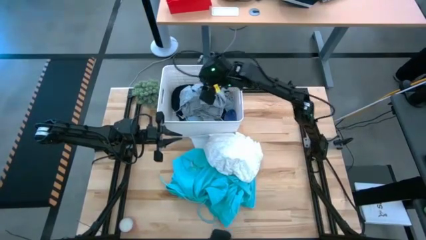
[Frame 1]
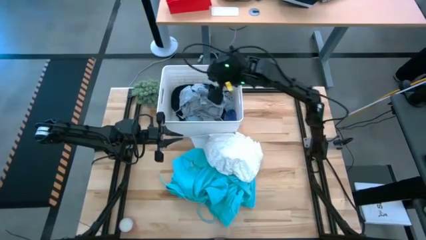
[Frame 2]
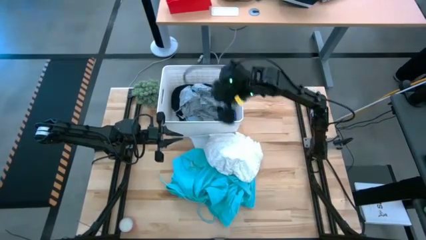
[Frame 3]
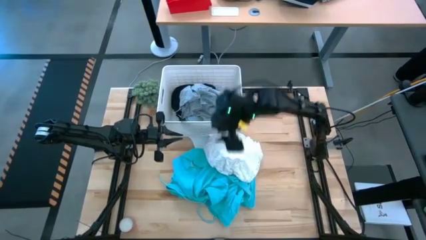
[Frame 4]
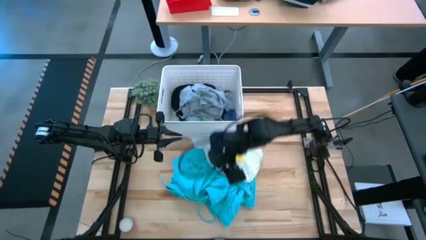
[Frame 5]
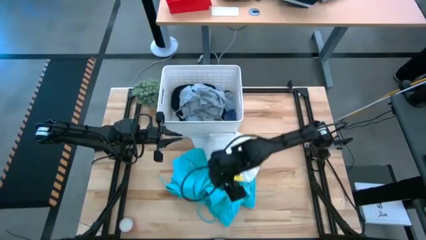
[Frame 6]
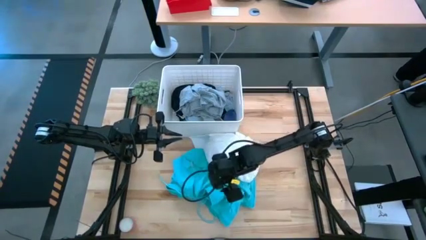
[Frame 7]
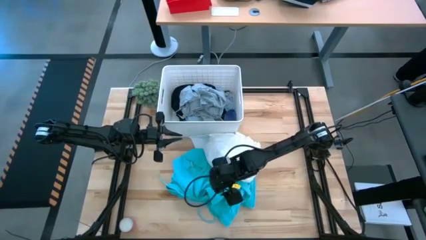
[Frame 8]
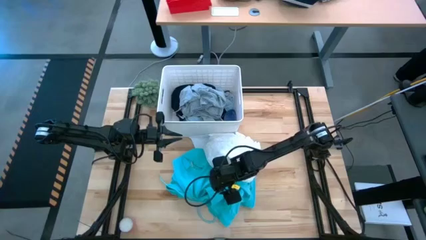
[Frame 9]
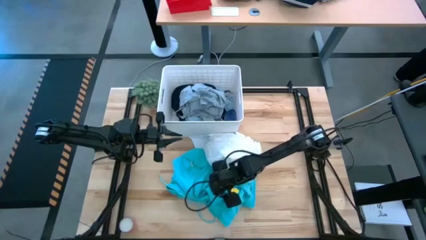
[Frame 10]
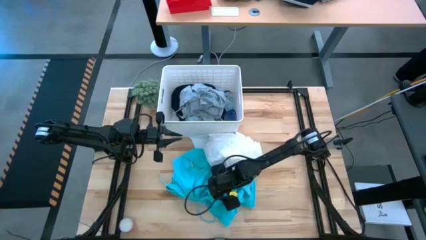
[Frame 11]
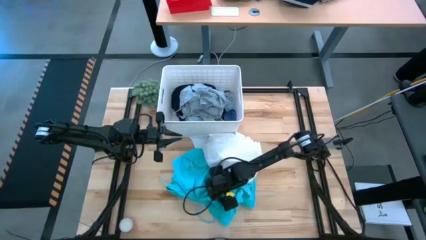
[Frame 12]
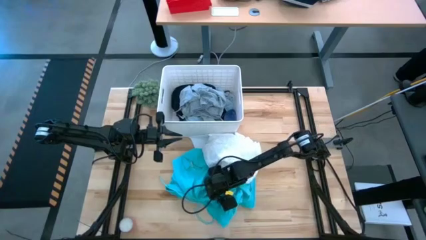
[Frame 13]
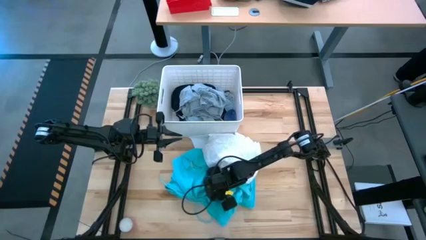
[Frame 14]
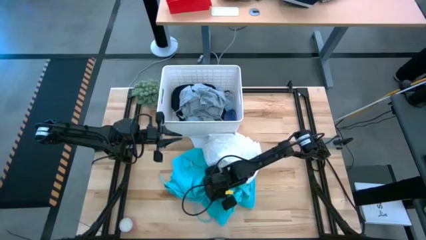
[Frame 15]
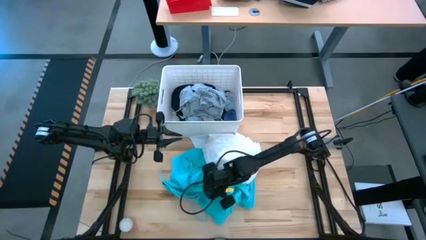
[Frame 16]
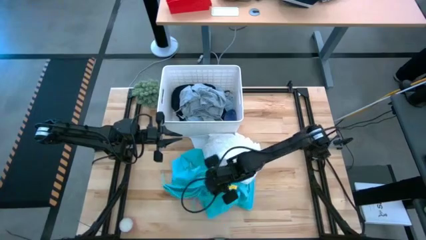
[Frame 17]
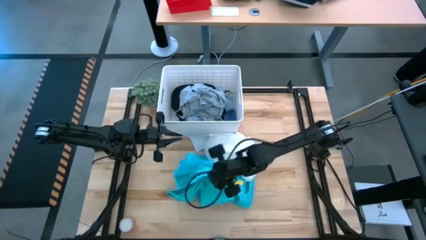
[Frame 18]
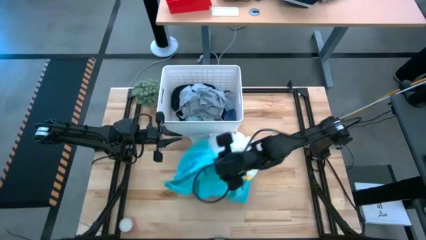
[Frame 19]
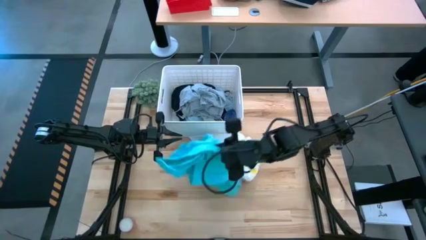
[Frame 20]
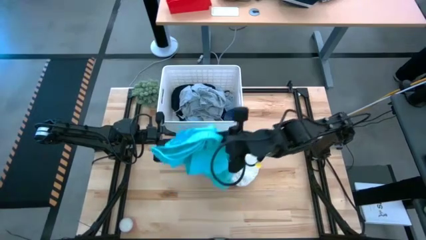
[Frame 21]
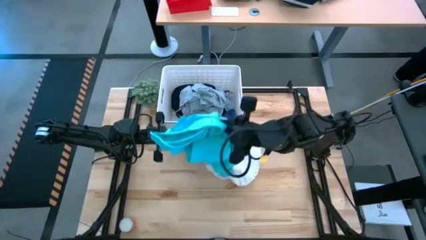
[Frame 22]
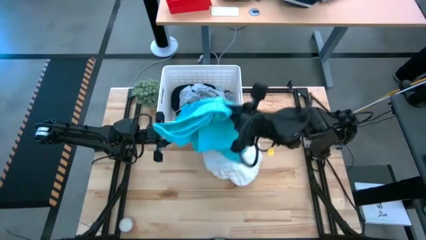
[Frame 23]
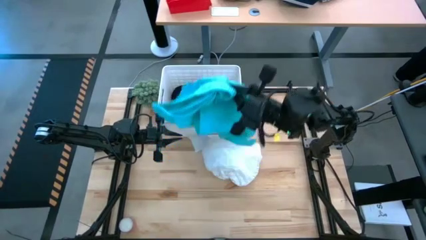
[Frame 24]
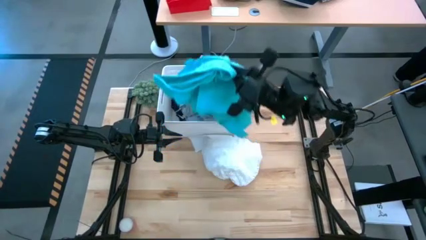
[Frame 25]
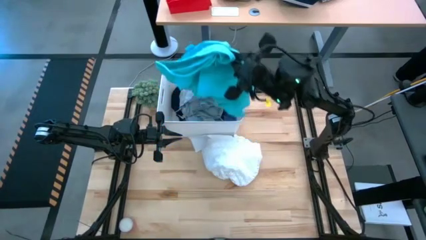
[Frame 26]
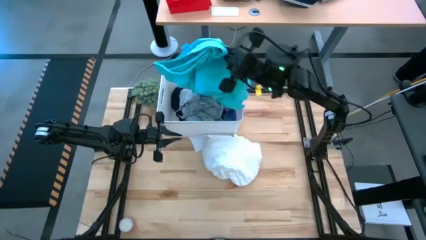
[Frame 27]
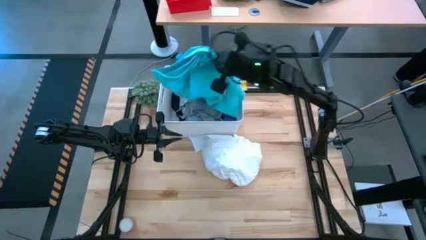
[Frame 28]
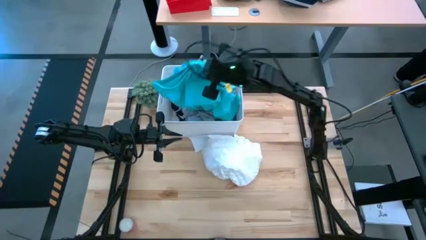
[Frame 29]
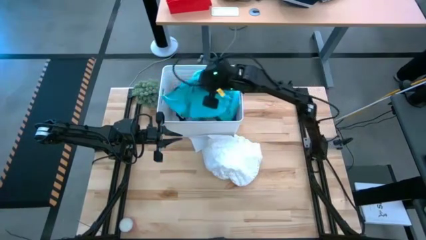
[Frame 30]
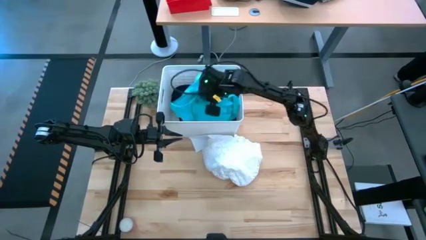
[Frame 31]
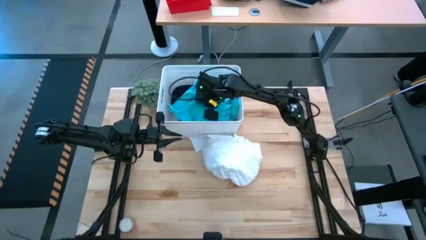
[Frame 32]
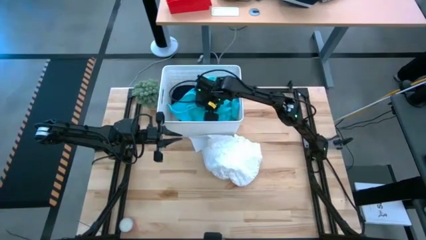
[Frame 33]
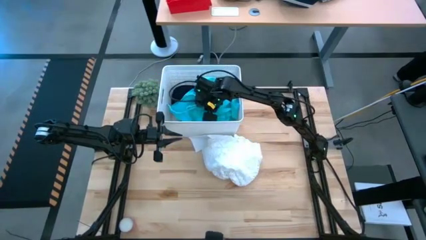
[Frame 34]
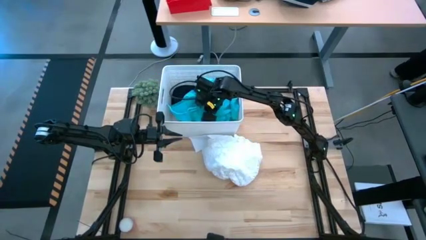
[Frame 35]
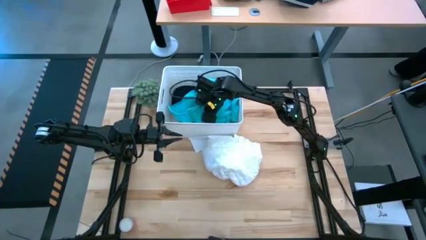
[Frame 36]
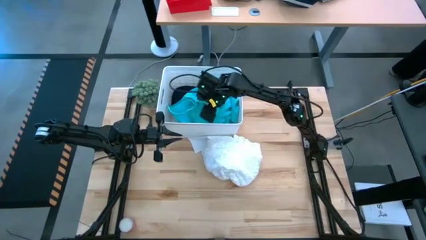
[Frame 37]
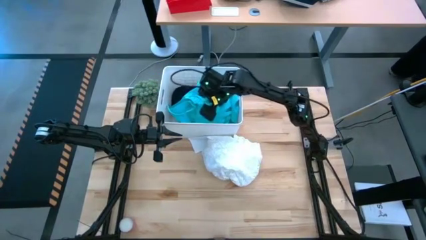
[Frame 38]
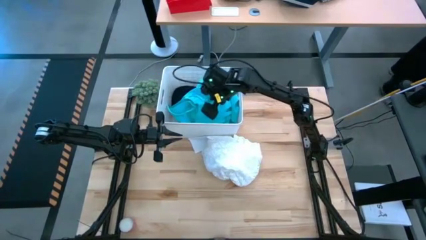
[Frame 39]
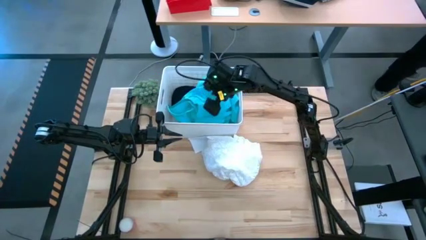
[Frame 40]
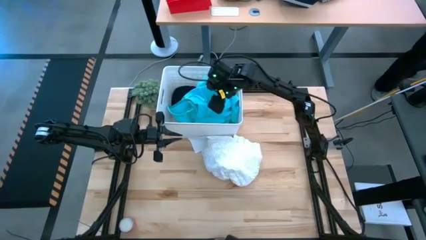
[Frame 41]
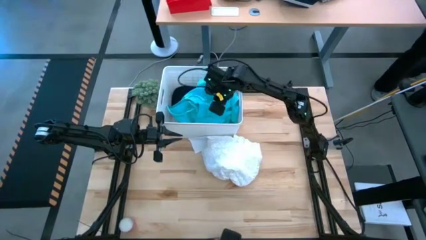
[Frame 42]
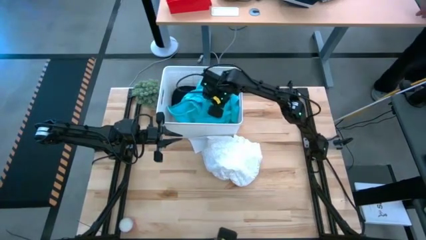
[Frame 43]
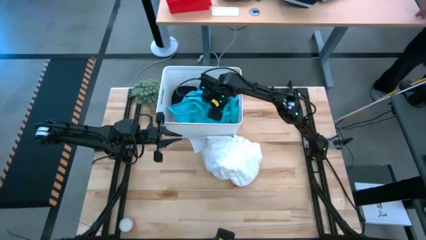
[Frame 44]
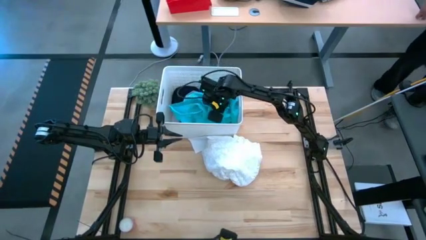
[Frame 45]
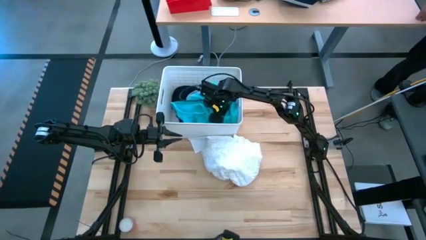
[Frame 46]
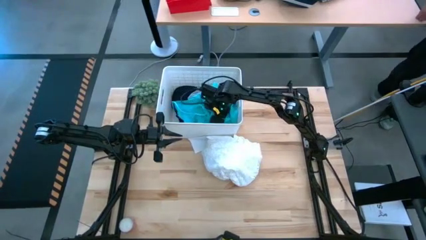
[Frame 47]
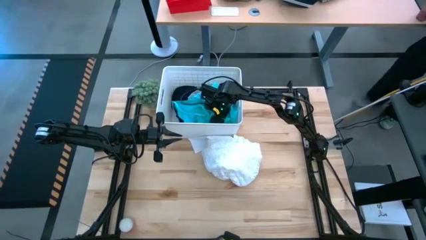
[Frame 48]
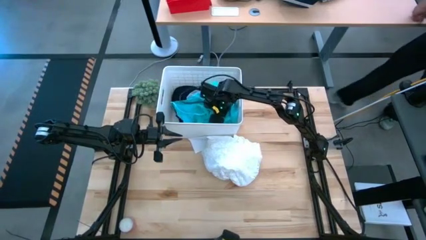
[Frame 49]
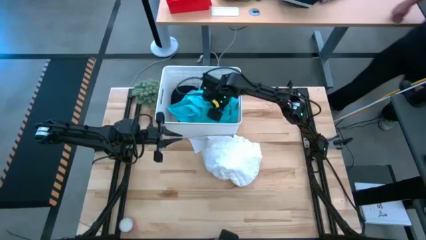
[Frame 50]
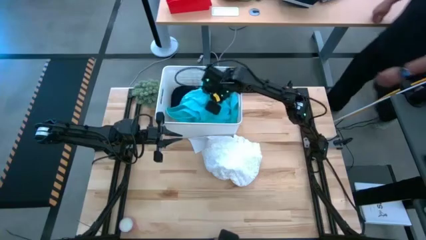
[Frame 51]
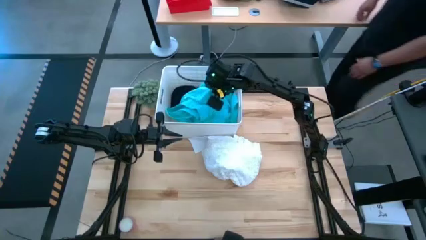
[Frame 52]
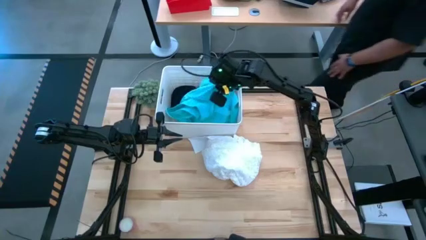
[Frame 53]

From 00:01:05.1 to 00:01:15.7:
Task: Sort clothes
Put the green shorts into the white bin

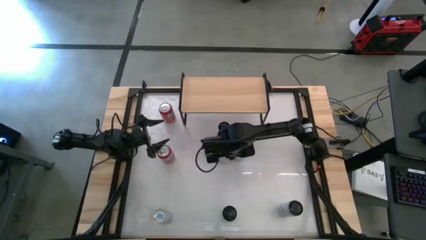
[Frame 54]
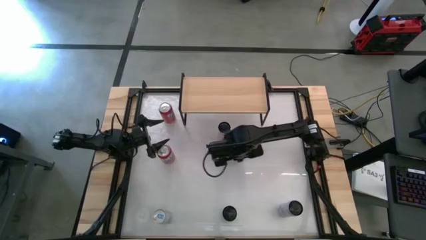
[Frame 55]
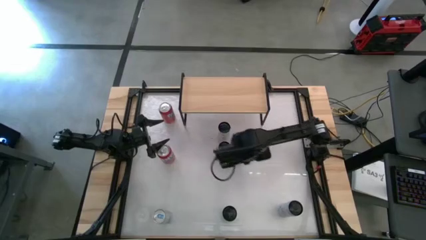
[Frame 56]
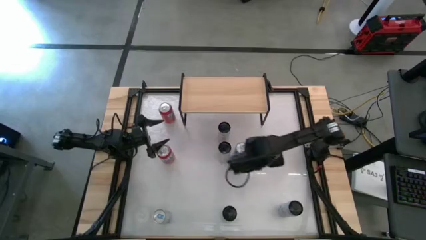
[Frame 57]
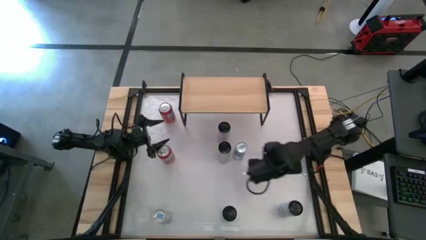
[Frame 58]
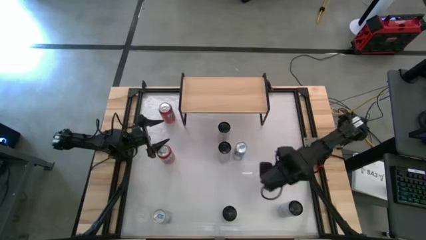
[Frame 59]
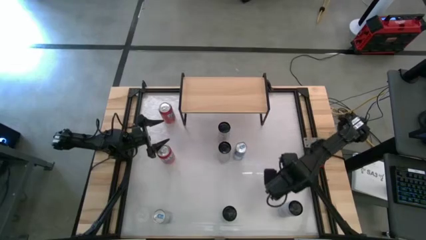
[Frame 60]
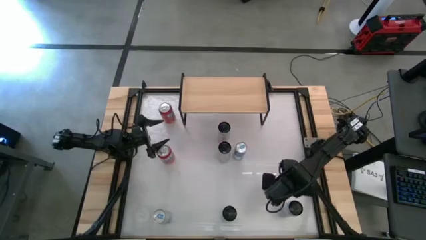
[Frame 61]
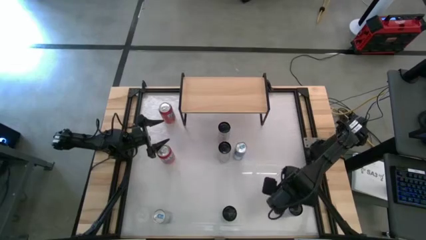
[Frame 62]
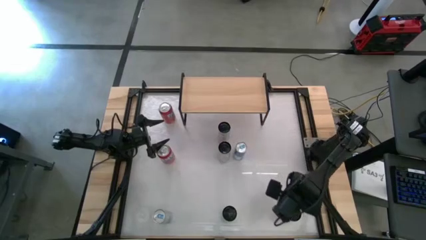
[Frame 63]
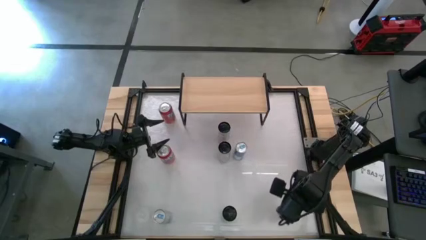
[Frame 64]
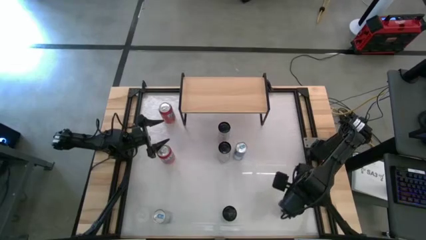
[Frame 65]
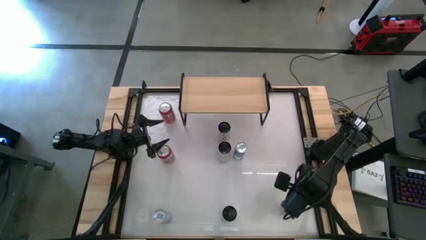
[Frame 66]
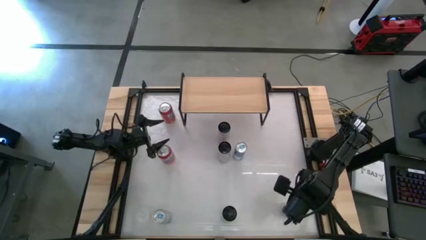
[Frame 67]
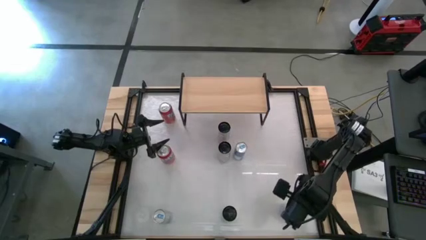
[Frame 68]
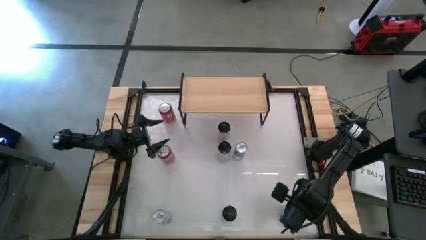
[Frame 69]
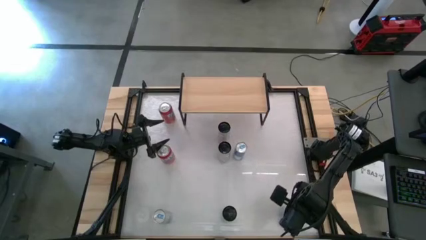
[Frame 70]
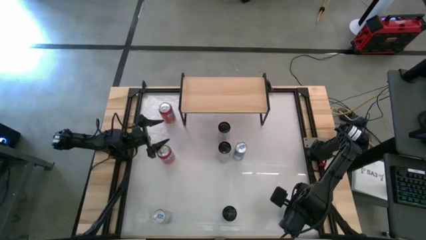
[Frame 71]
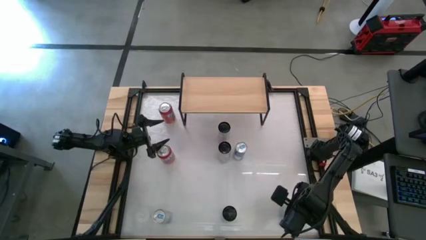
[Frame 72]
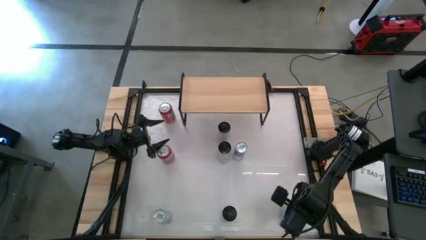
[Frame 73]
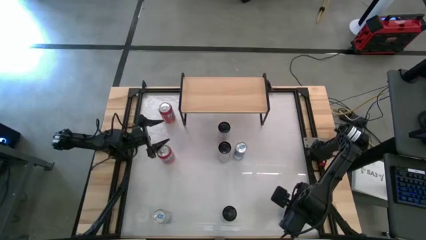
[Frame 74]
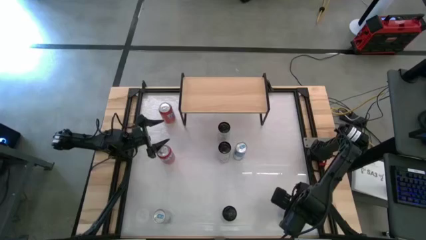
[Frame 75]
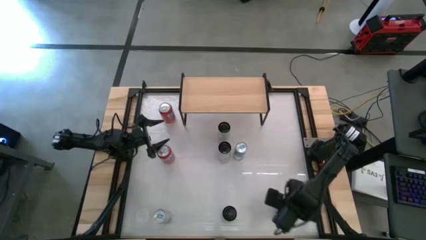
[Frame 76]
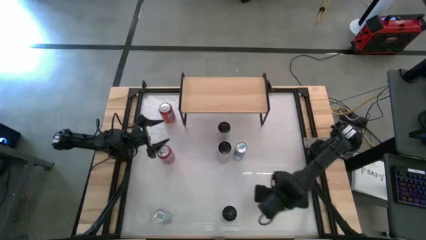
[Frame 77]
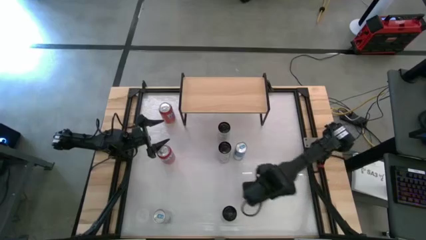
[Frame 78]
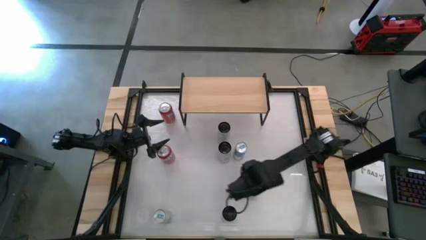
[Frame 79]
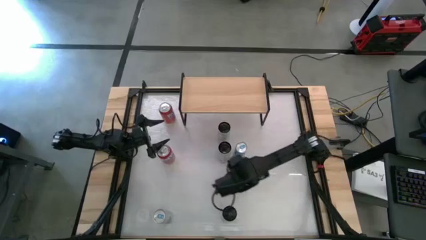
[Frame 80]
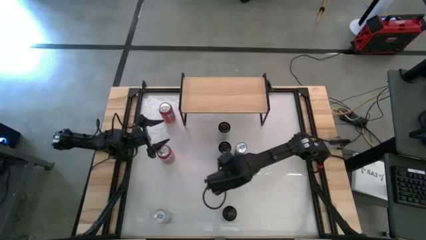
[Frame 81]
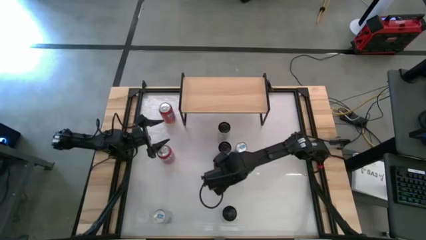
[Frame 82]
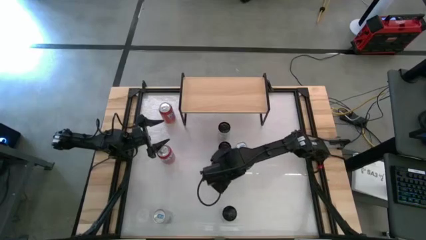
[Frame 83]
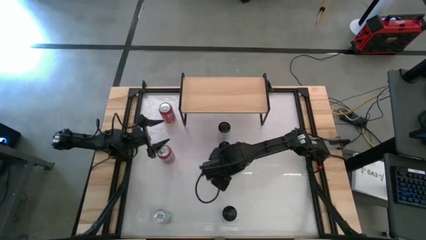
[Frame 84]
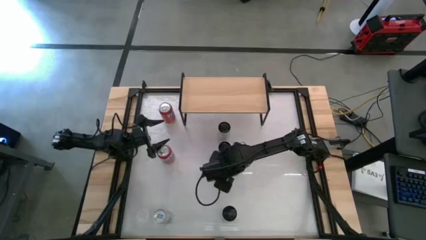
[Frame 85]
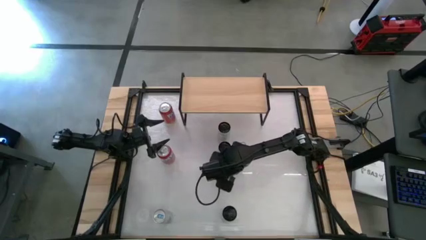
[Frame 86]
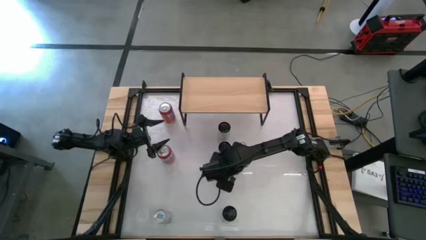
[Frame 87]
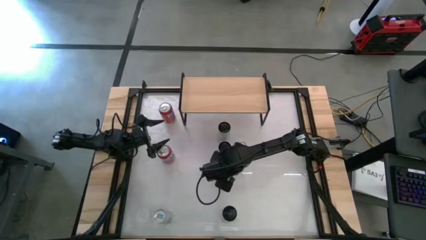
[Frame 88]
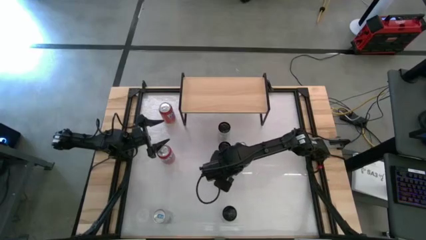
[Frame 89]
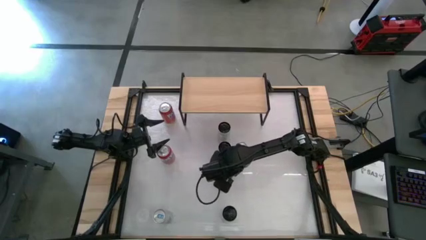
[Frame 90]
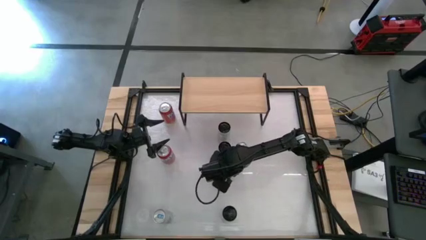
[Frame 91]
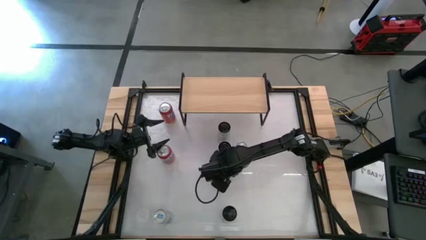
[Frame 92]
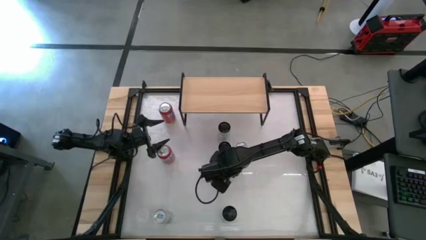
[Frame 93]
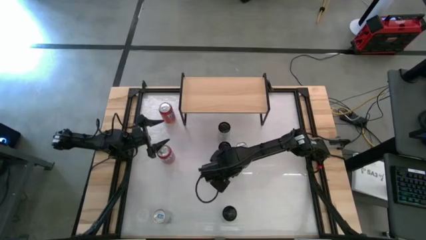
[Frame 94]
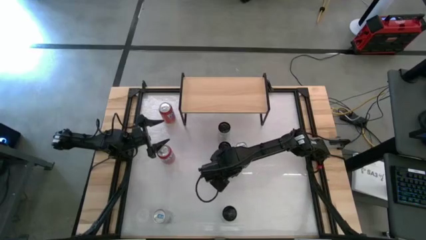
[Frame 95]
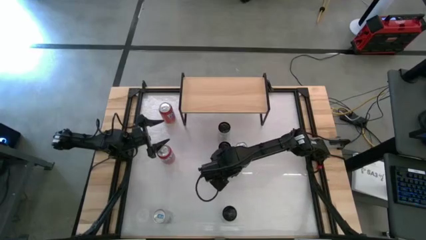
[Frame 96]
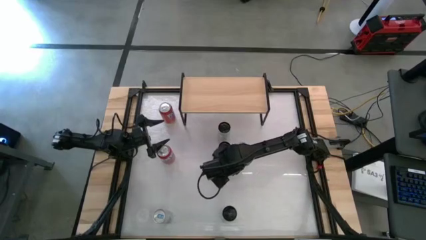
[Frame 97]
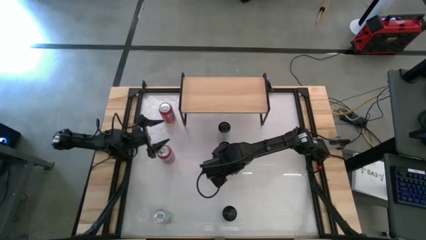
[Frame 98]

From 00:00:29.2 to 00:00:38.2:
Task: Place canned beverage on shelf
Move the bottom white pink soda can to the center of the table
